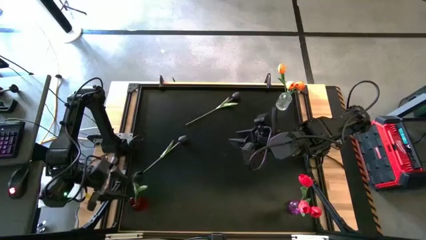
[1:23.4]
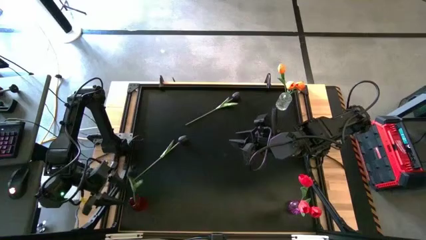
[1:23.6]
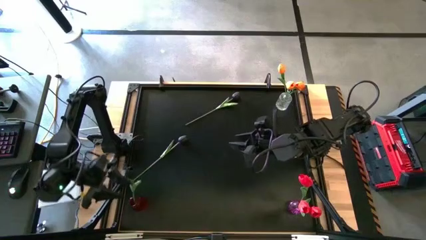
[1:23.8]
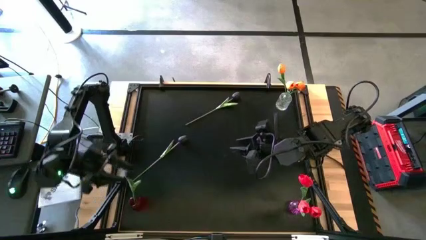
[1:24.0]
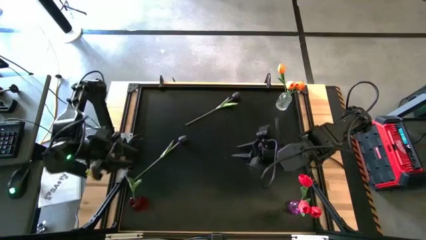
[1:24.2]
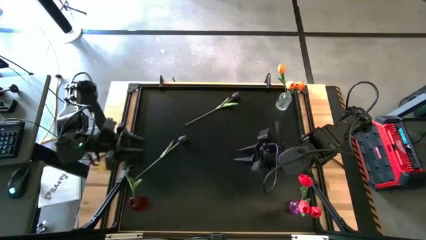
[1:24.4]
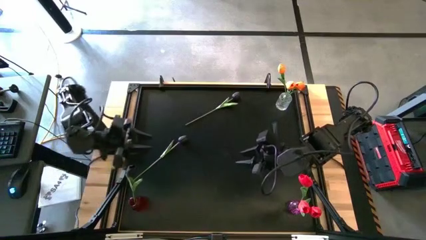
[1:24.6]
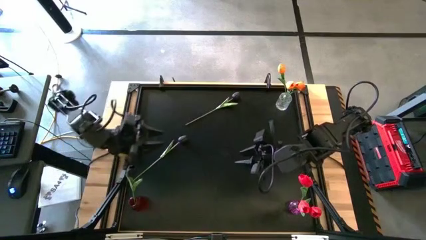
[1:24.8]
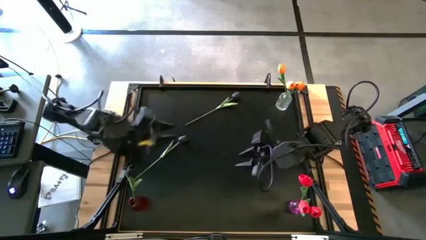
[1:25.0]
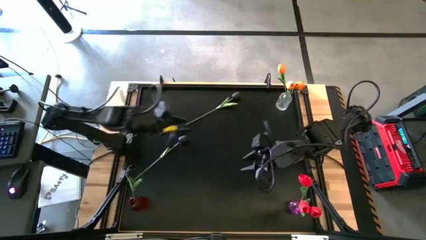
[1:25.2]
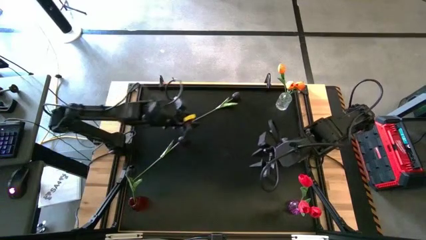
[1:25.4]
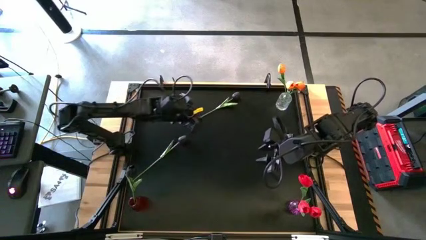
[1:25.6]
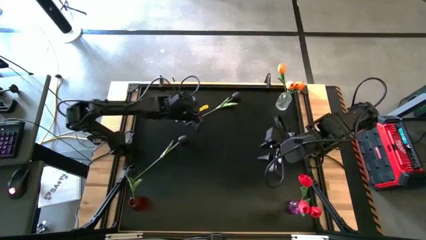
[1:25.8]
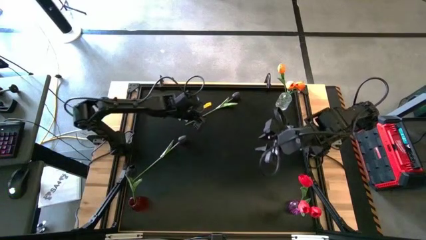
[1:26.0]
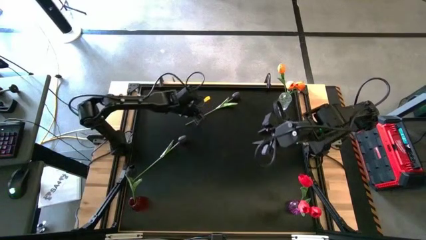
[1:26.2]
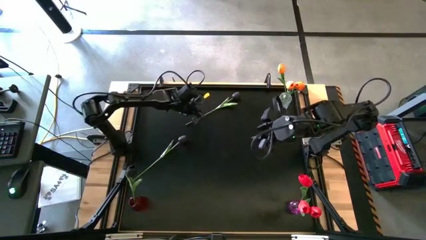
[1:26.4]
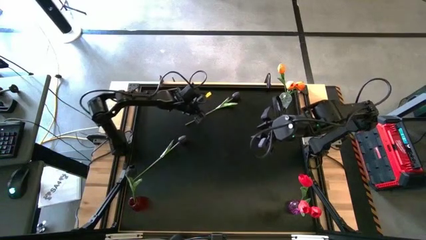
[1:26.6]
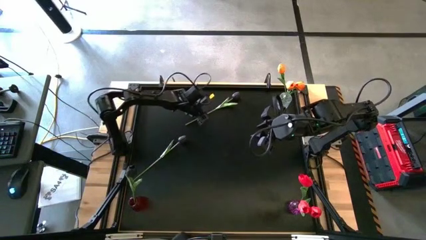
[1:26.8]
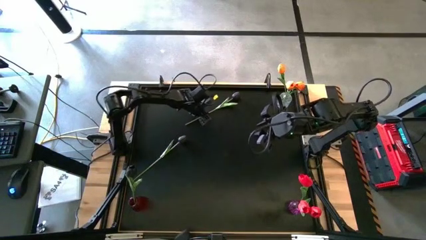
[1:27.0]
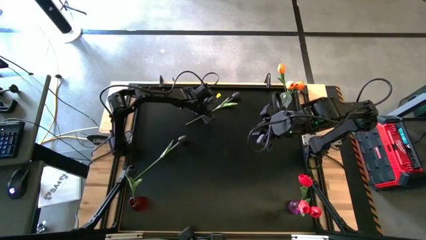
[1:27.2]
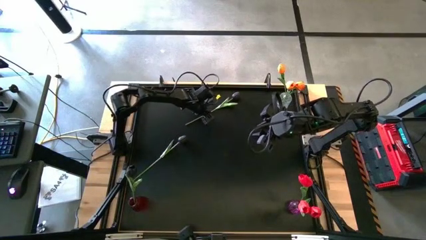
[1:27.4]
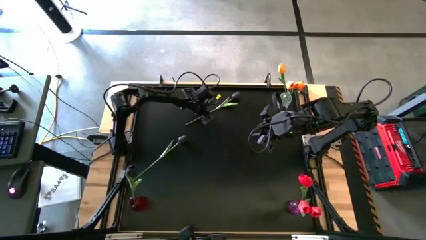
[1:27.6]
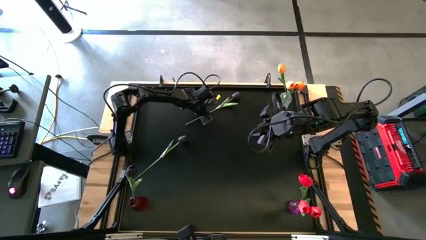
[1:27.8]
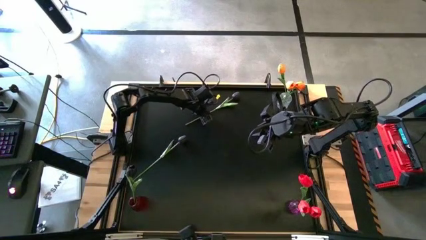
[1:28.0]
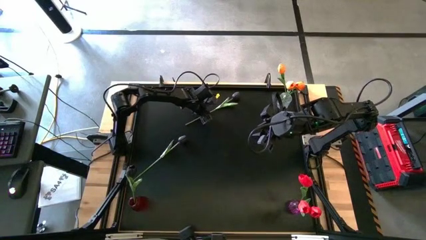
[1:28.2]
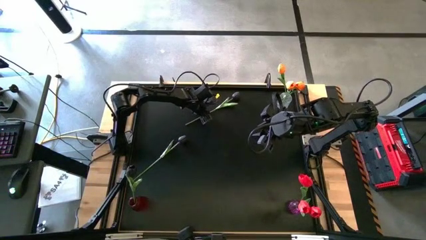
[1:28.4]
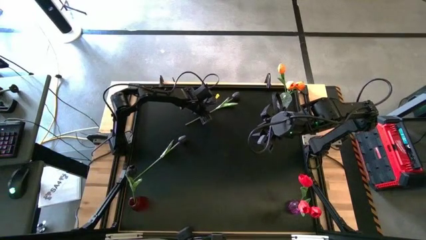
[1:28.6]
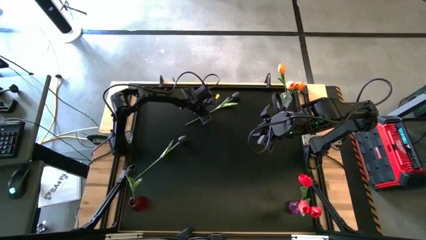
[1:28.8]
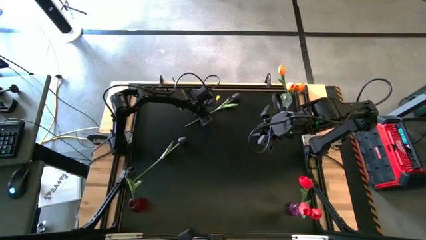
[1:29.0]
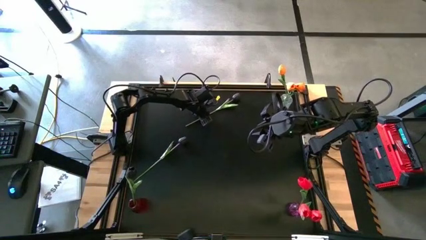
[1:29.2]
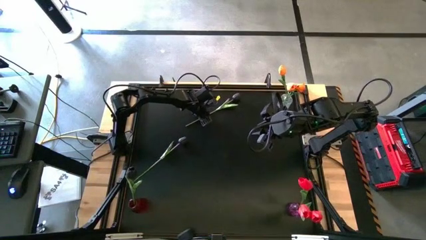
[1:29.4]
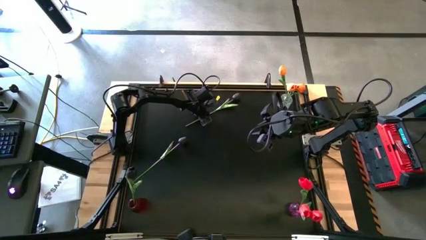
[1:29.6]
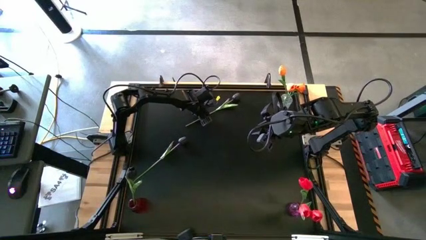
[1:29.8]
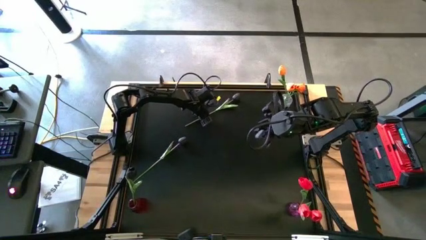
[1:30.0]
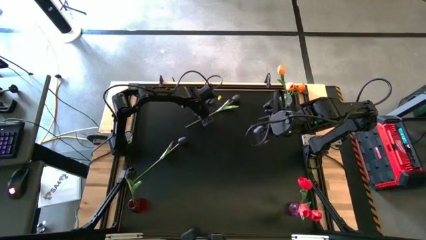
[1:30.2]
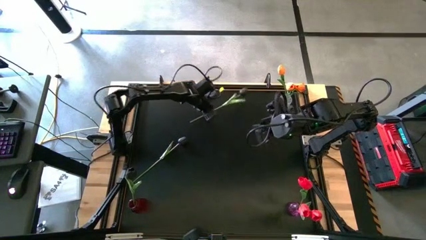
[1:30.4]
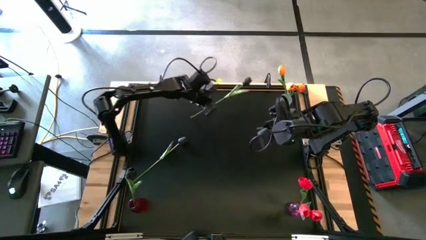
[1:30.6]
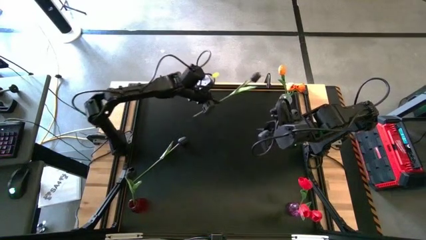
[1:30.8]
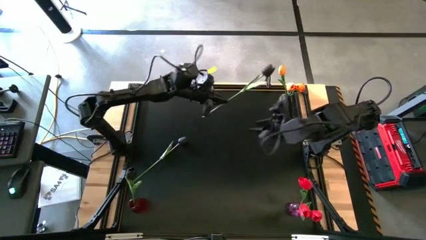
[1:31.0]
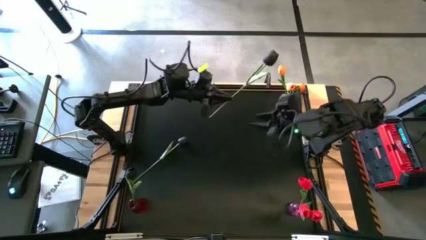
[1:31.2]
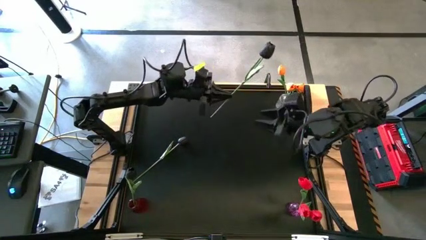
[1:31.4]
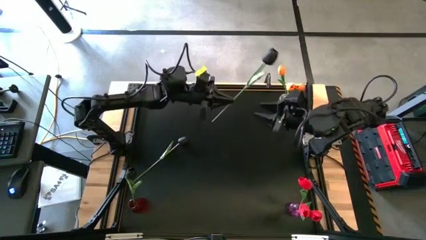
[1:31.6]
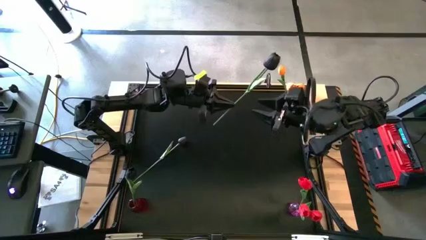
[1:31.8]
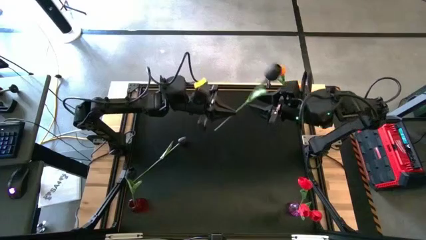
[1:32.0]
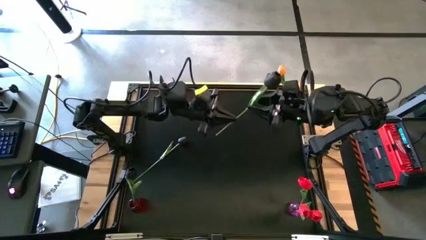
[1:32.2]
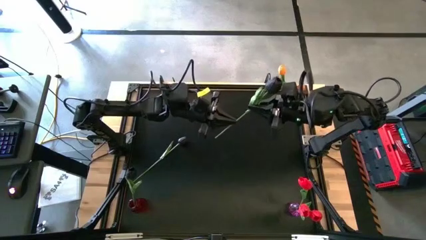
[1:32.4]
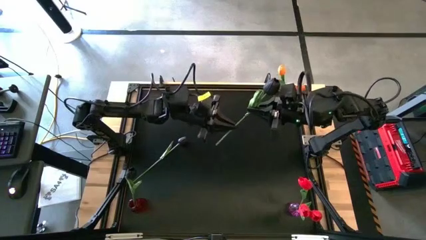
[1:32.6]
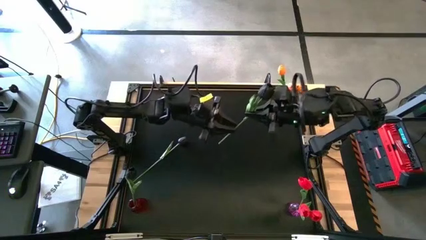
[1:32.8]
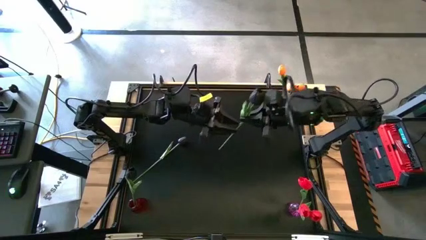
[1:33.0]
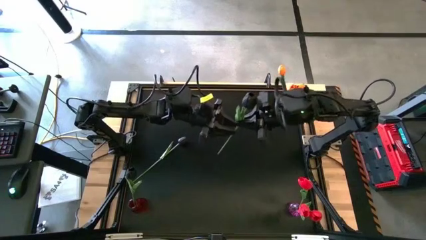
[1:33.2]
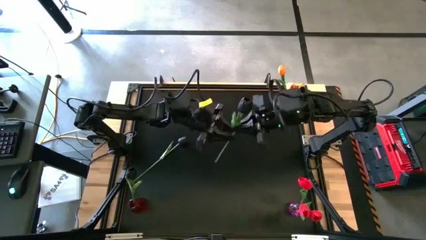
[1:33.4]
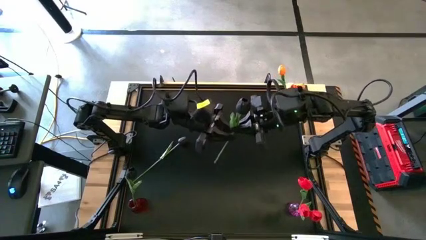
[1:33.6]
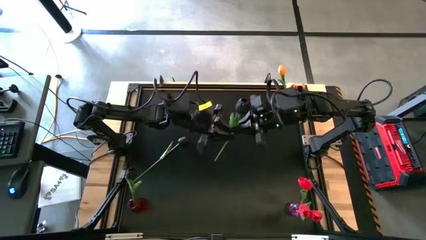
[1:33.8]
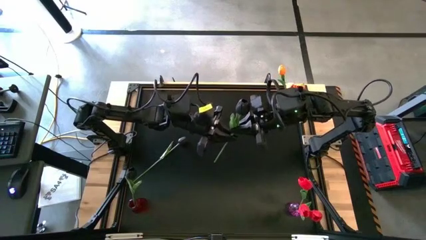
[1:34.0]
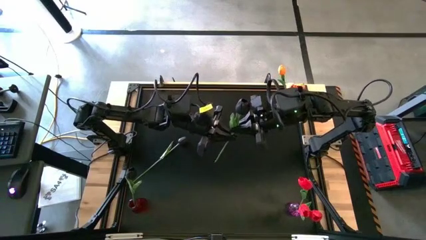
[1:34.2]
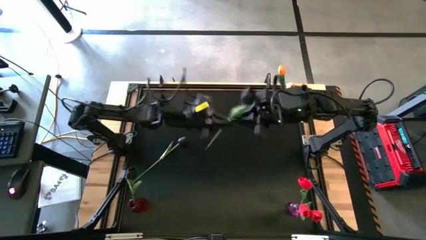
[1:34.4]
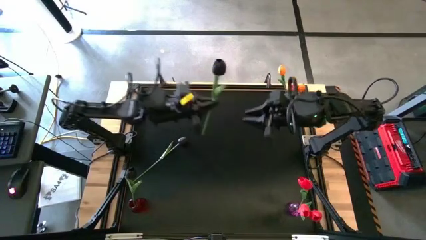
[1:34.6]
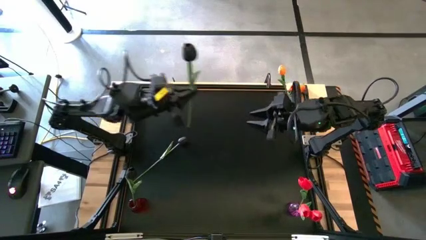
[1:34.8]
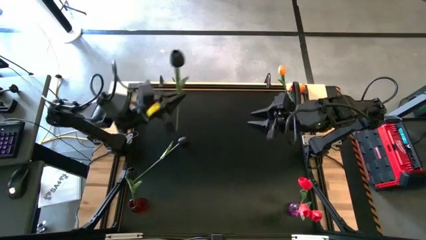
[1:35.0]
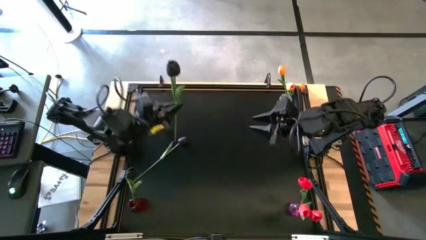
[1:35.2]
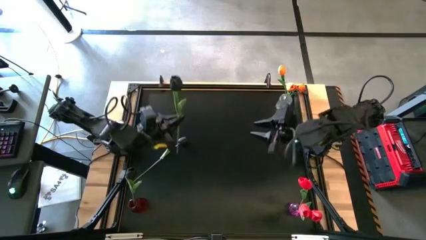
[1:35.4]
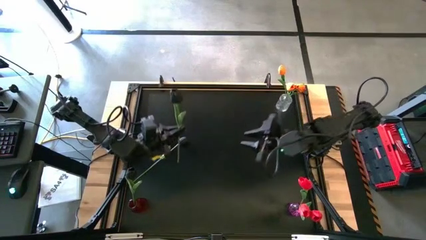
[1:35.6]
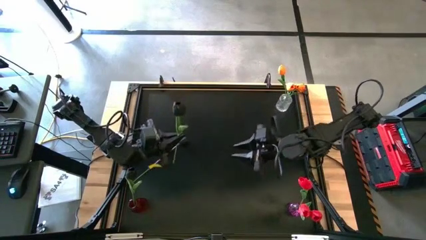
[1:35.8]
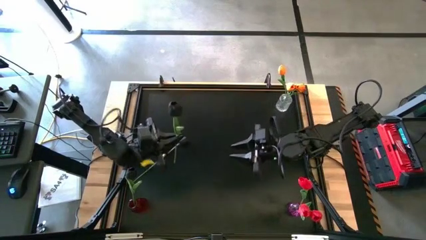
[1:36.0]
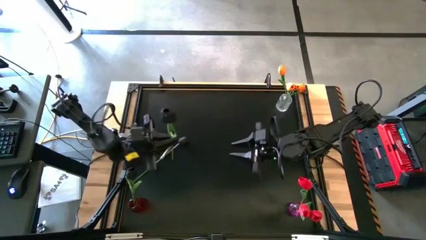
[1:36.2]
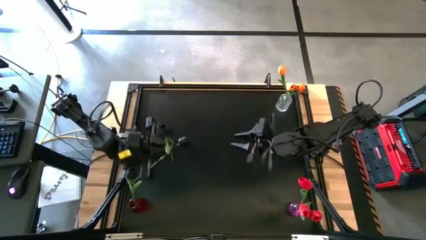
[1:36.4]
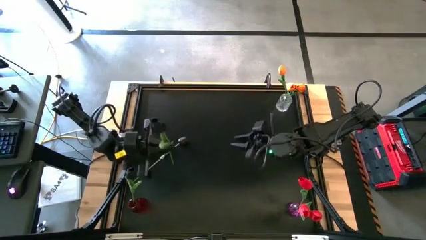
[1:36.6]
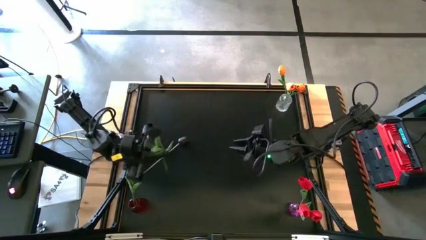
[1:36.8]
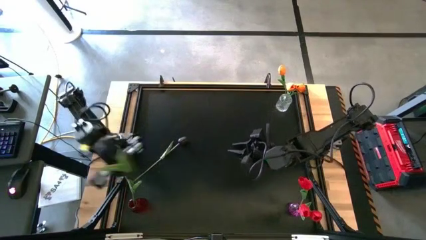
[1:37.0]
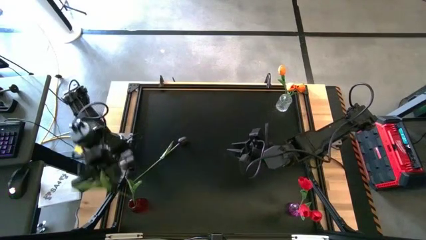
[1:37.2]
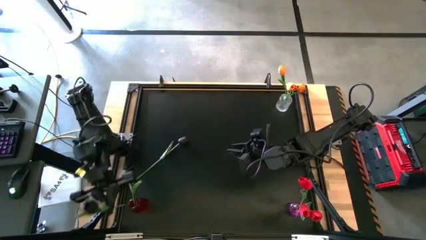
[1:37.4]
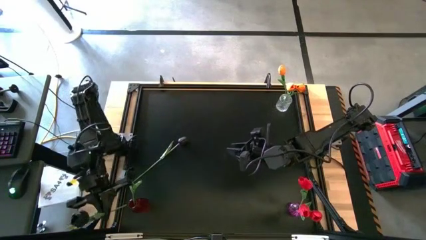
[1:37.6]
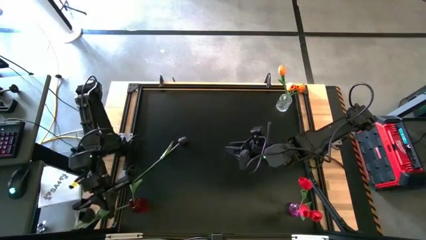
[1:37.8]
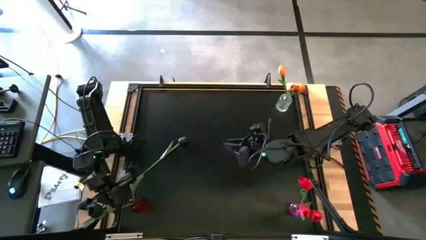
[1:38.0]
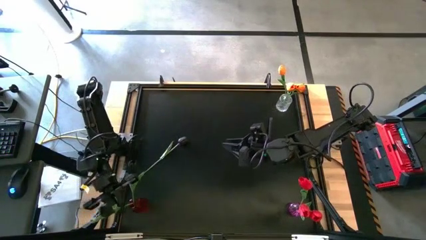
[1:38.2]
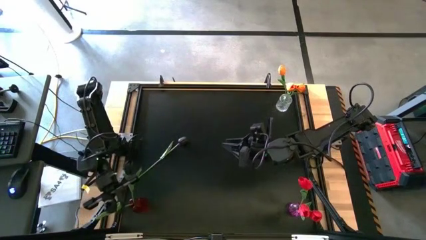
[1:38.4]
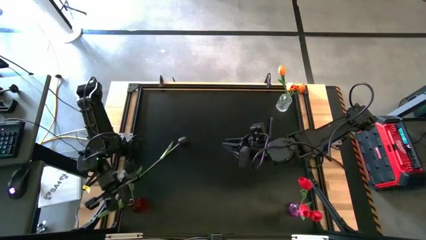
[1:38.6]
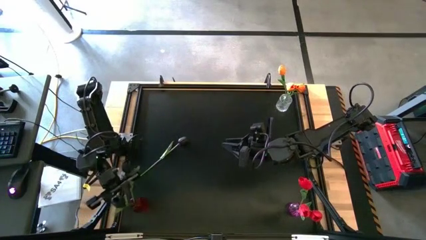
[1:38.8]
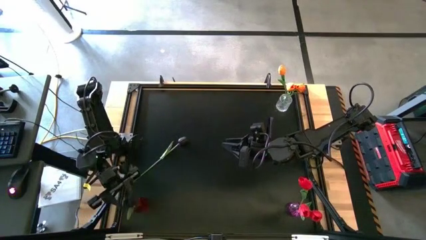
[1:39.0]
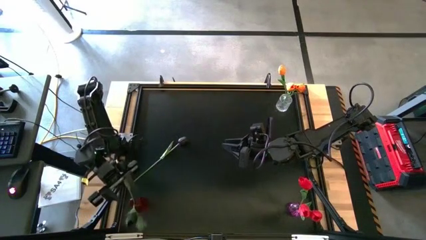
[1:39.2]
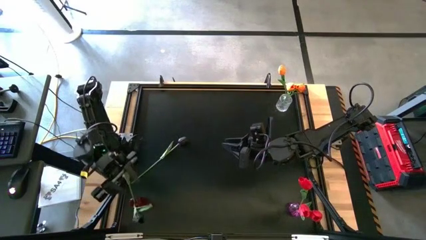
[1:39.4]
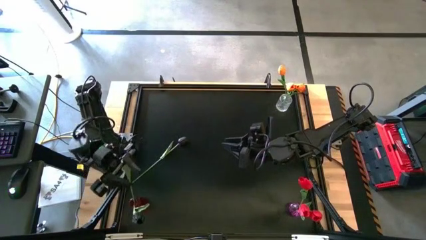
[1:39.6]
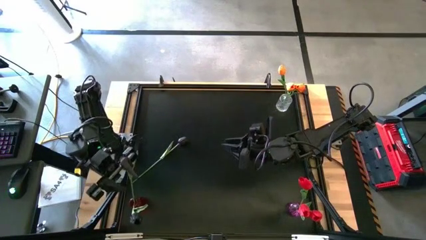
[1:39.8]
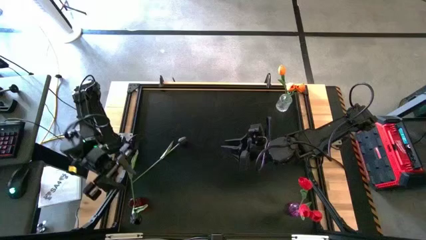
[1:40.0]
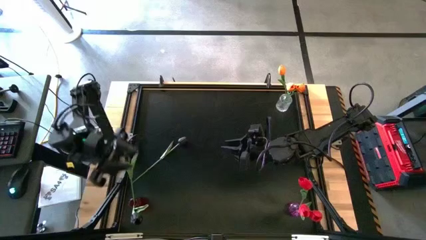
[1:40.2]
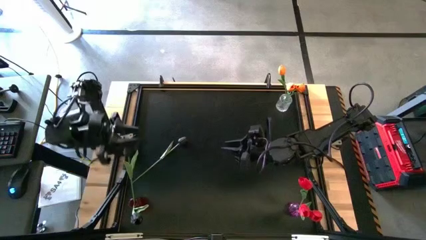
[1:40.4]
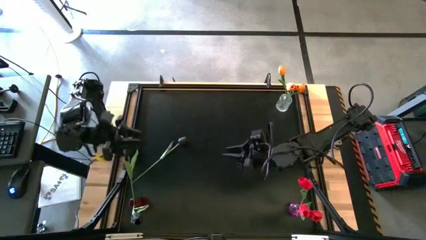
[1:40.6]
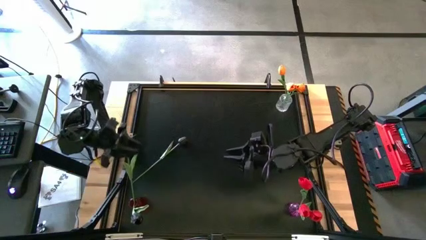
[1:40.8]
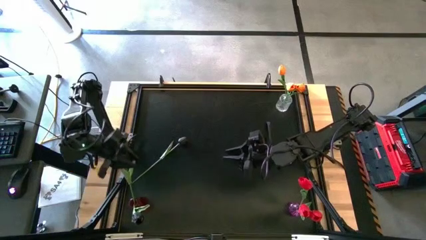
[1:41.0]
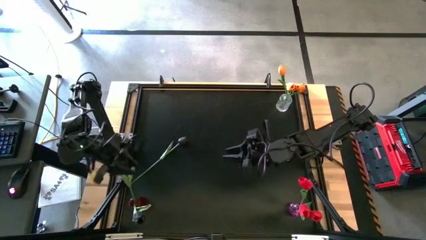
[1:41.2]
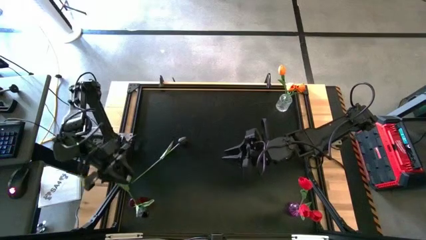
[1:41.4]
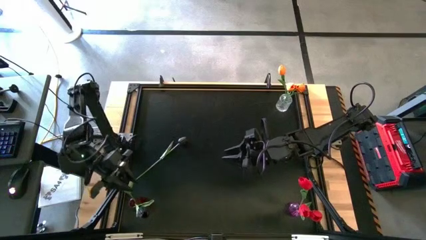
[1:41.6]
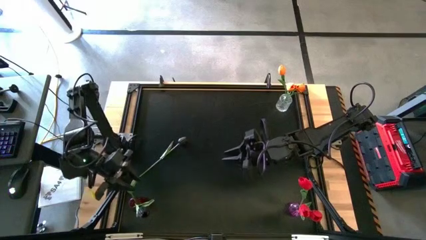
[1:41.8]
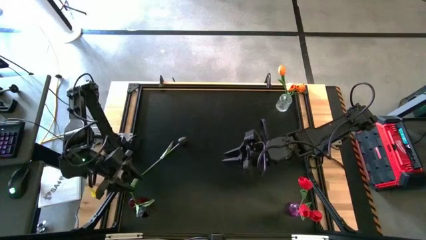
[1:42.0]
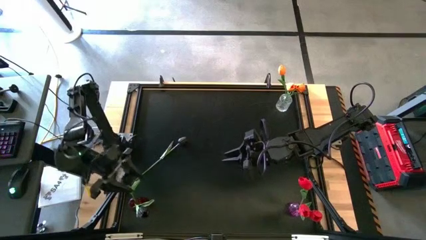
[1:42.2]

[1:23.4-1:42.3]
Task: Sort flowers into vase by color
Put the top black tulip into the red flower vase
